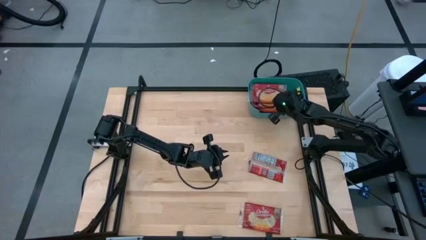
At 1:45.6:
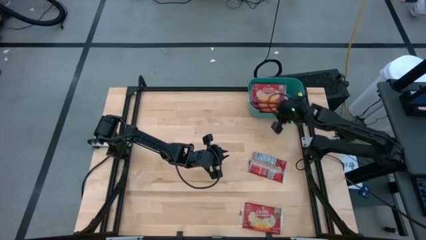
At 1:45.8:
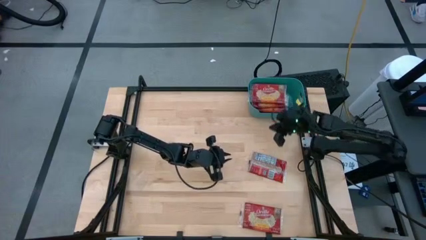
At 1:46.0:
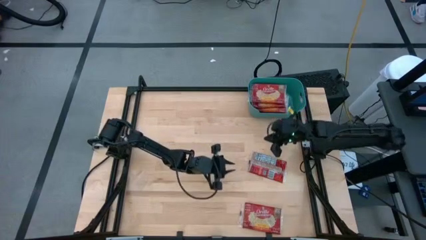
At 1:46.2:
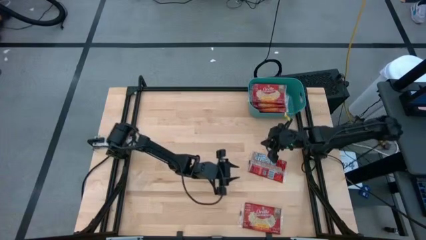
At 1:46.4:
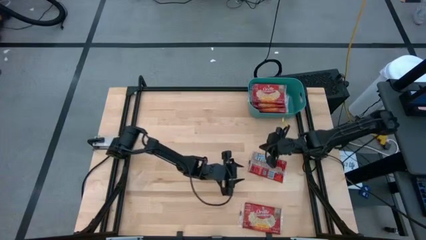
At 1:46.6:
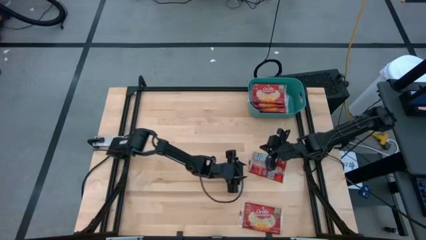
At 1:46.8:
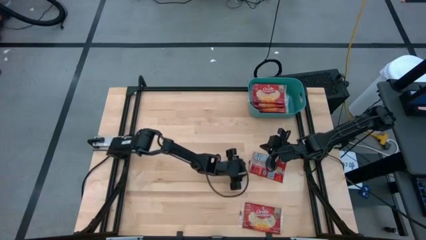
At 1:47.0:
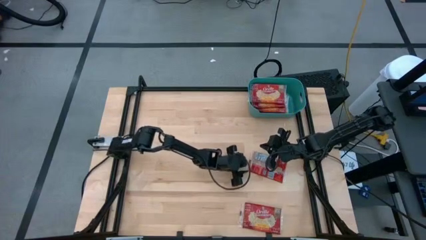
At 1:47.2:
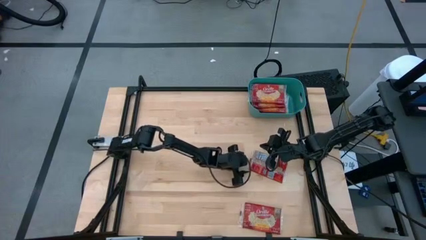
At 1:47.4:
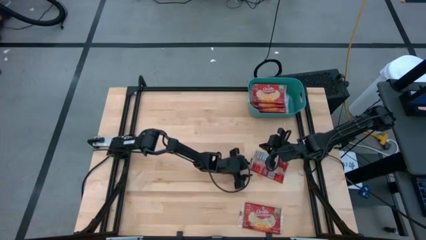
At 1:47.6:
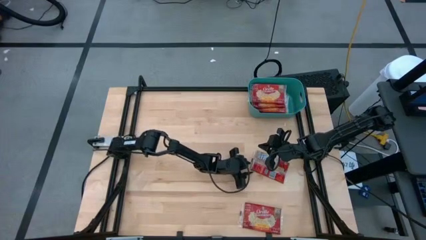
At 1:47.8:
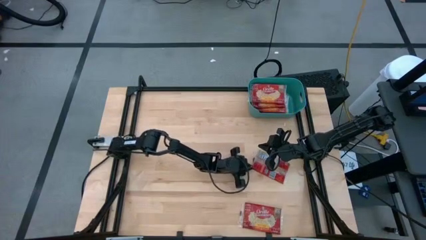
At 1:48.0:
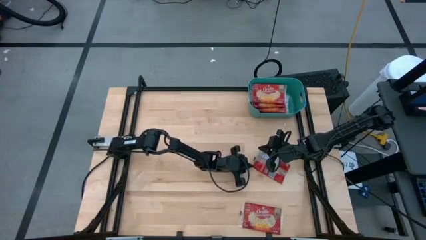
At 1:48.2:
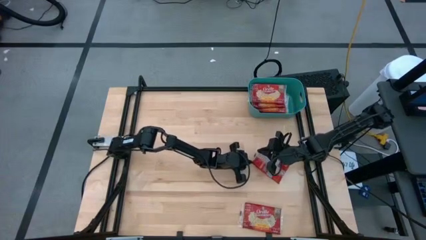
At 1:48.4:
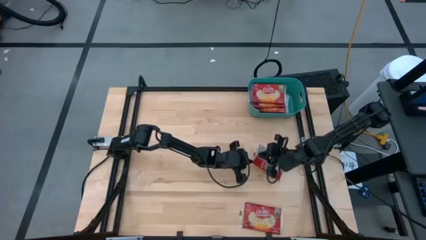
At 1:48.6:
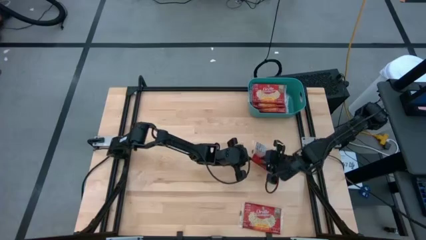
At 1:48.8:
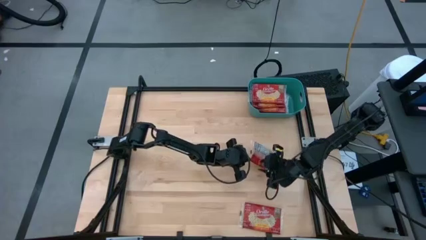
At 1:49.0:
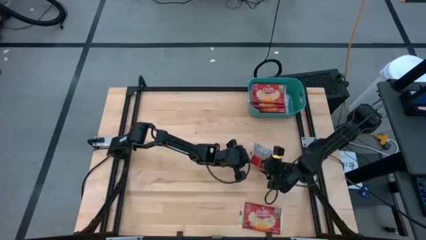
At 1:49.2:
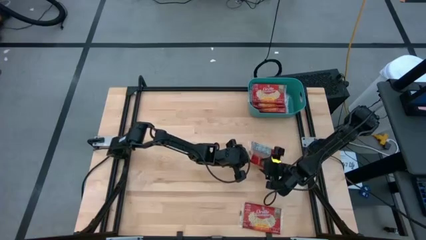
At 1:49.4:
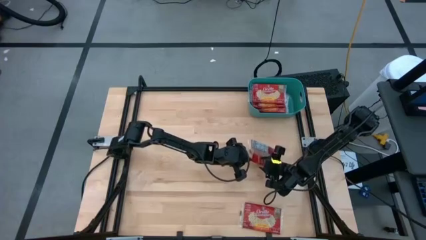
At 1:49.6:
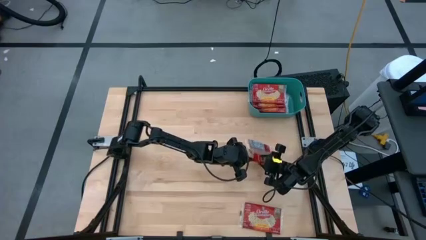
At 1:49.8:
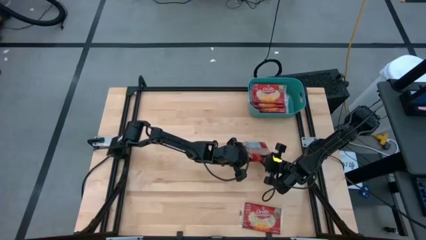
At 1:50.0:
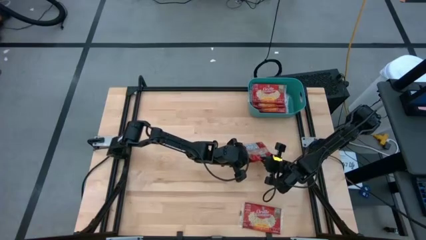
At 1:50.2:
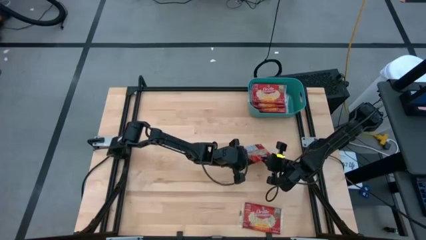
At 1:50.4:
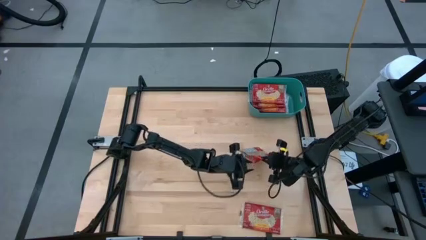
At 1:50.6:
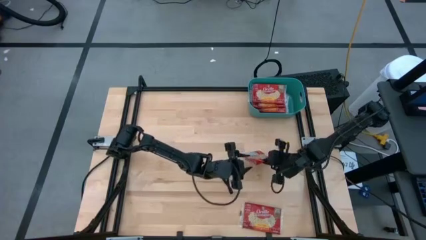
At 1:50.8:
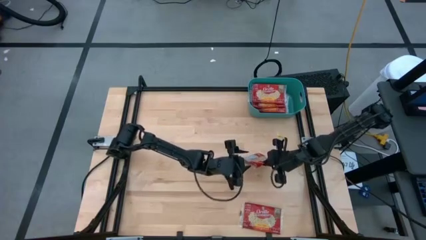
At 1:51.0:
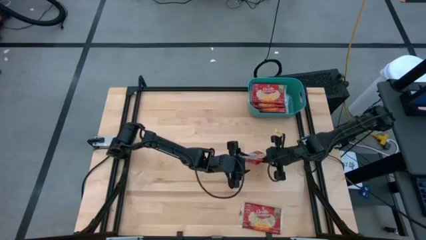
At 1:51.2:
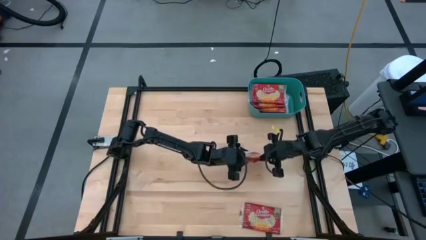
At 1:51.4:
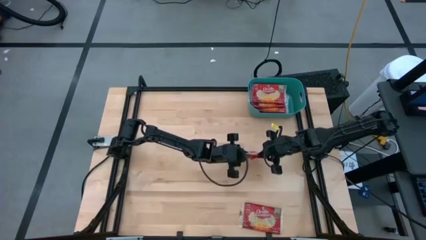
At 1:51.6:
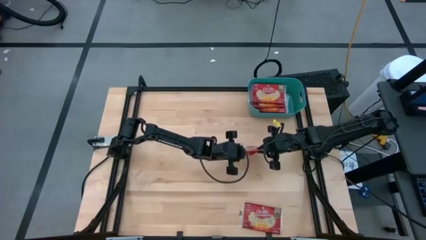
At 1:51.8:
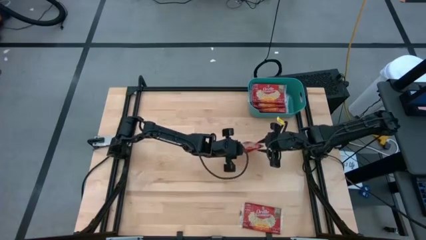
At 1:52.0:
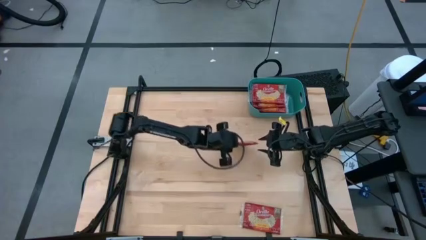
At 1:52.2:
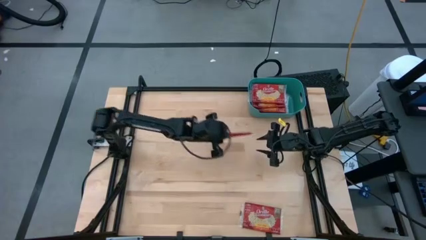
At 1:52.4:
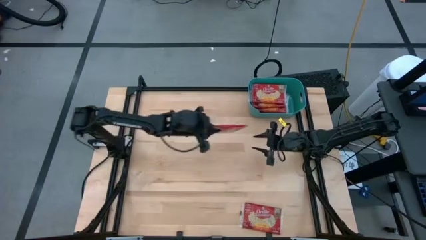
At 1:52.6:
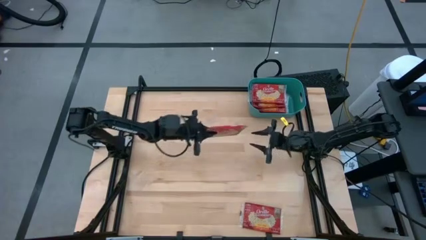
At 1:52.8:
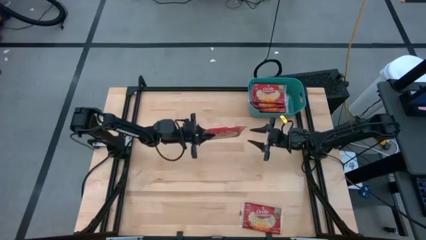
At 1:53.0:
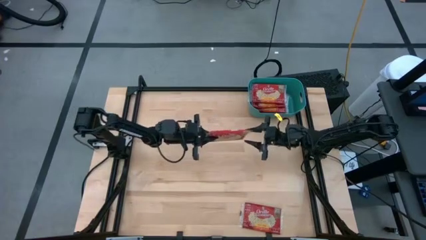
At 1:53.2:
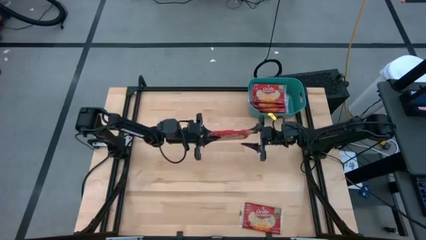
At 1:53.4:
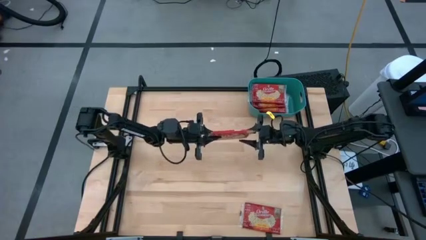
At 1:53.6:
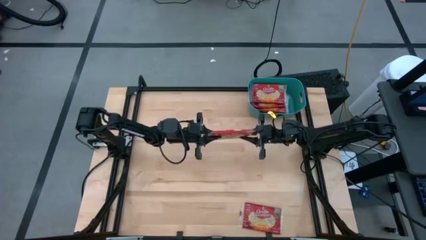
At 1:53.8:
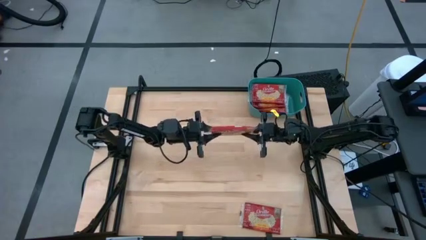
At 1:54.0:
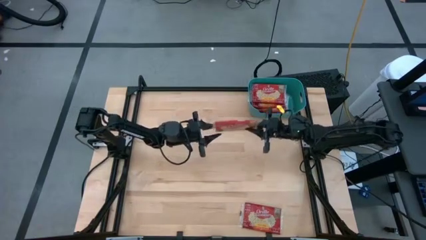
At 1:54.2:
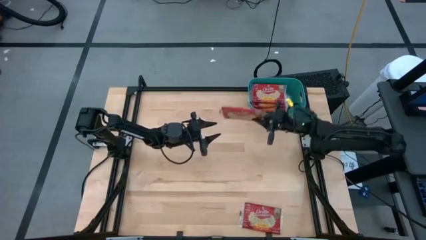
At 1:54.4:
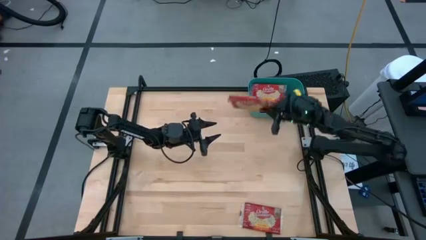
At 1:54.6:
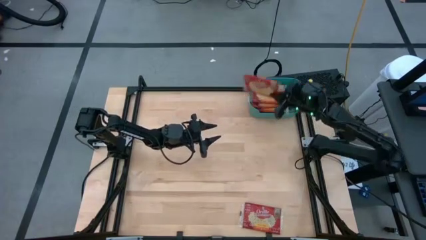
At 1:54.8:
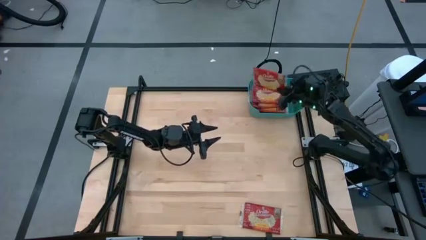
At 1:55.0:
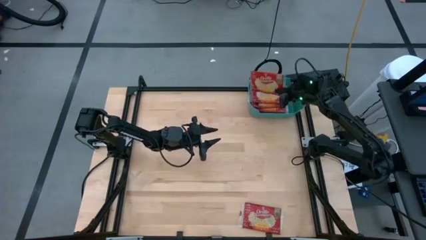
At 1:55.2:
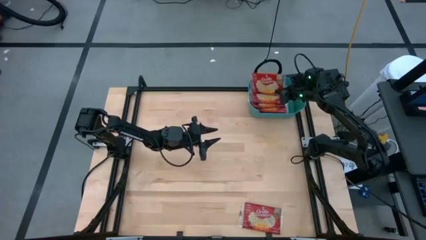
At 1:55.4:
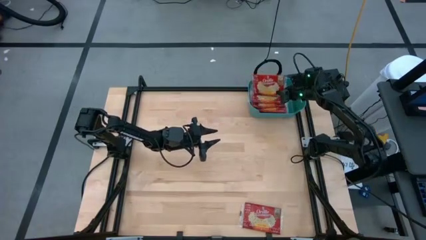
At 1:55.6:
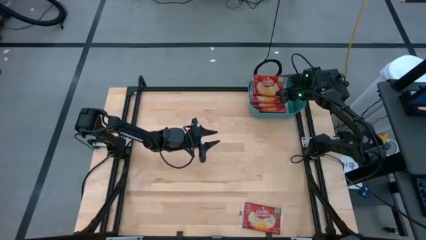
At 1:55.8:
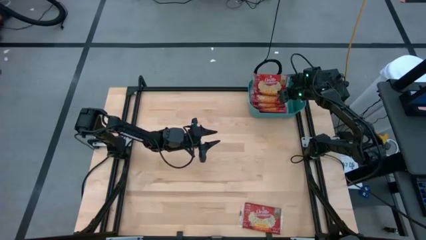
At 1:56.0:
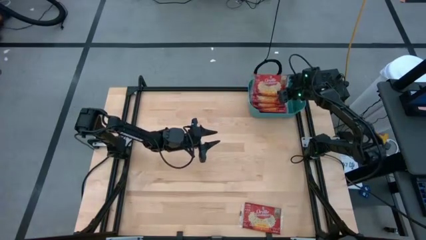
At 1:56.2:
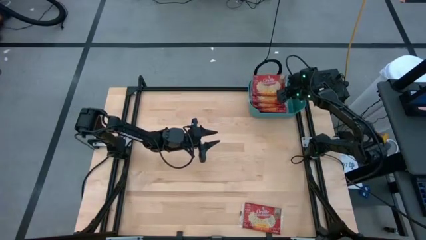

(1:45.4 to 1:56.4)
Task: Sort popcorn bags into baskets
Put the red popcorn bag into the blue bin

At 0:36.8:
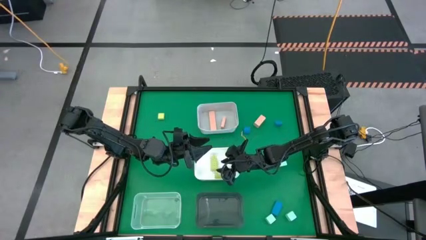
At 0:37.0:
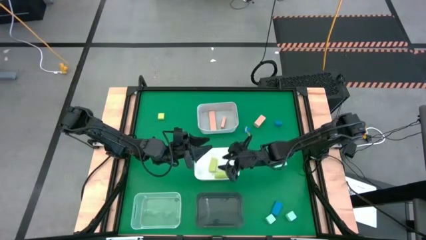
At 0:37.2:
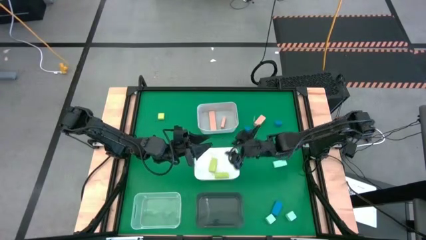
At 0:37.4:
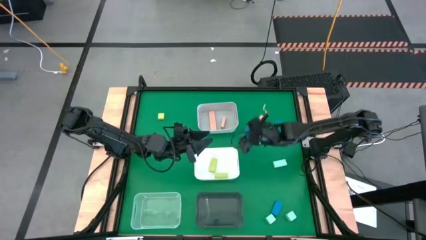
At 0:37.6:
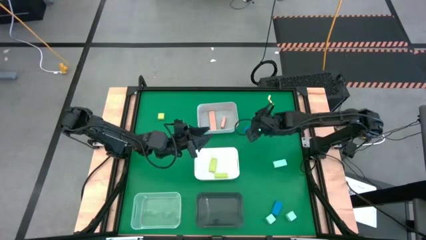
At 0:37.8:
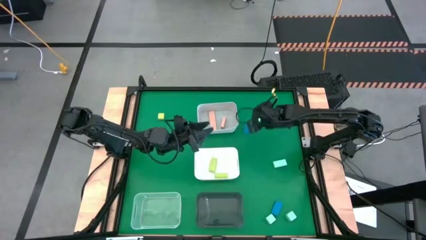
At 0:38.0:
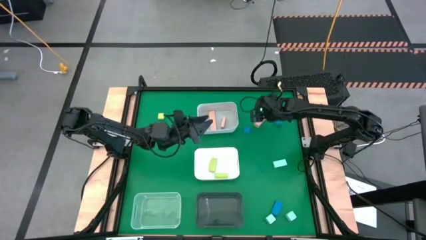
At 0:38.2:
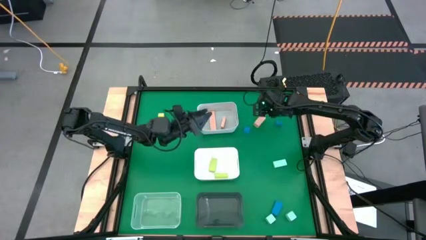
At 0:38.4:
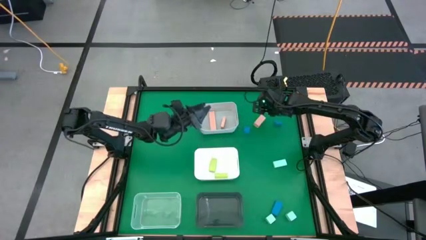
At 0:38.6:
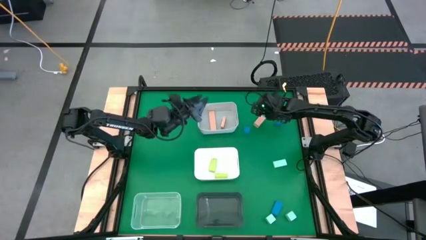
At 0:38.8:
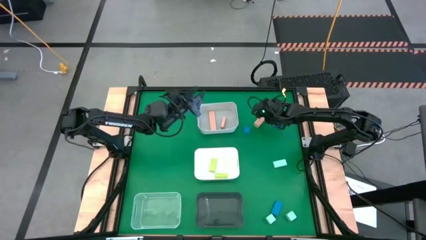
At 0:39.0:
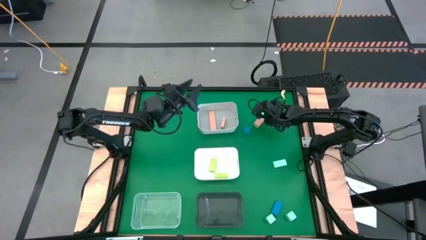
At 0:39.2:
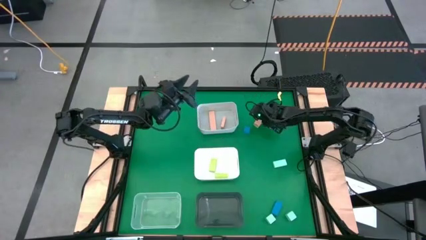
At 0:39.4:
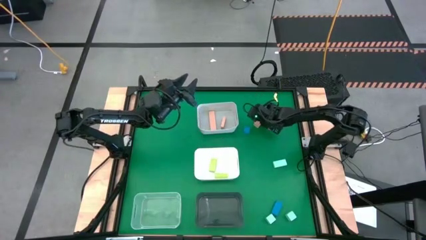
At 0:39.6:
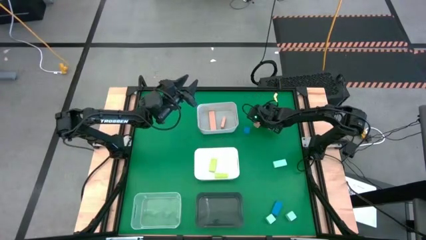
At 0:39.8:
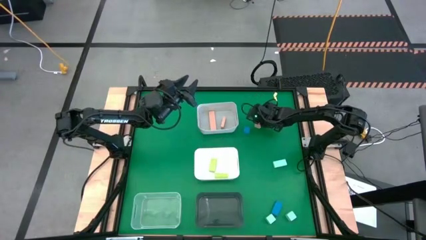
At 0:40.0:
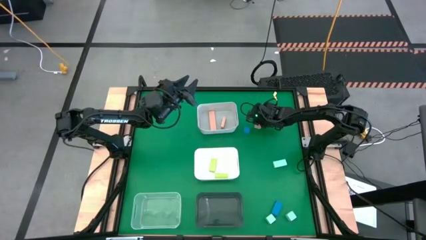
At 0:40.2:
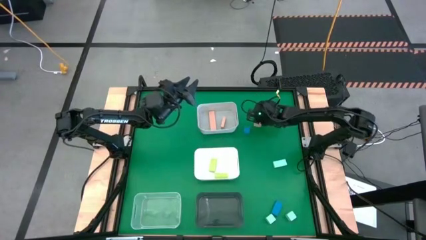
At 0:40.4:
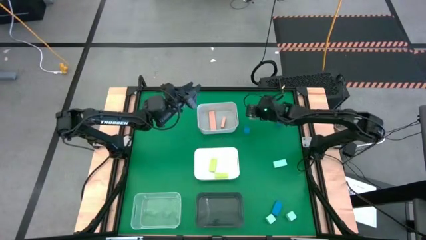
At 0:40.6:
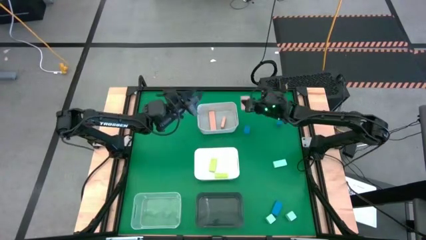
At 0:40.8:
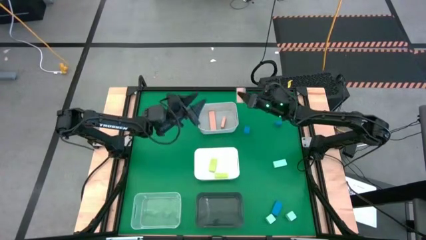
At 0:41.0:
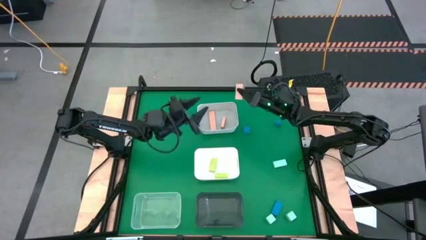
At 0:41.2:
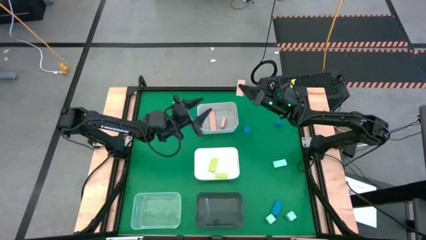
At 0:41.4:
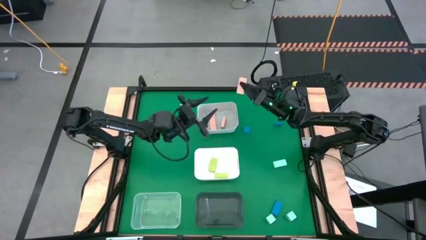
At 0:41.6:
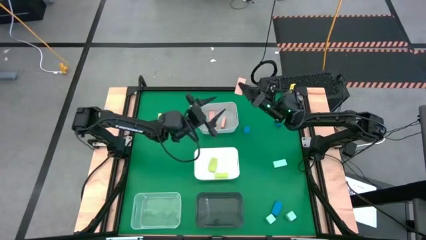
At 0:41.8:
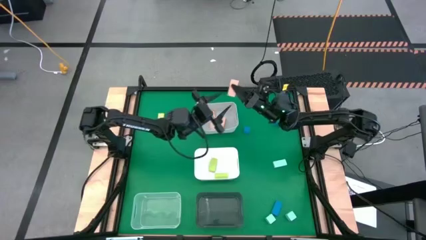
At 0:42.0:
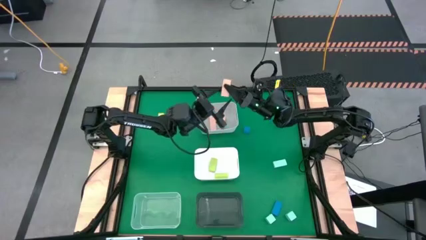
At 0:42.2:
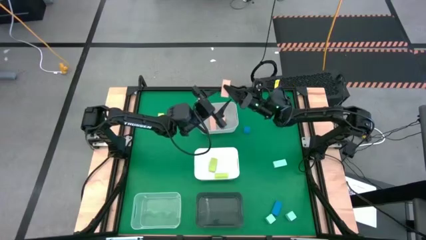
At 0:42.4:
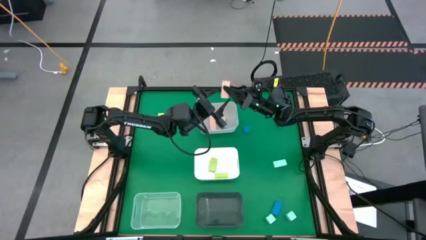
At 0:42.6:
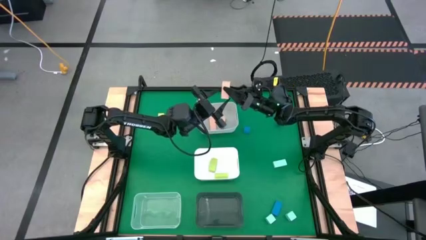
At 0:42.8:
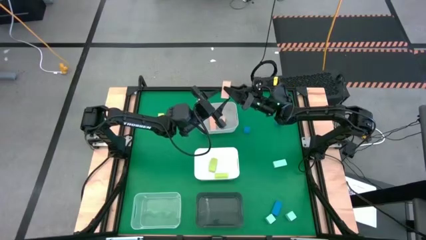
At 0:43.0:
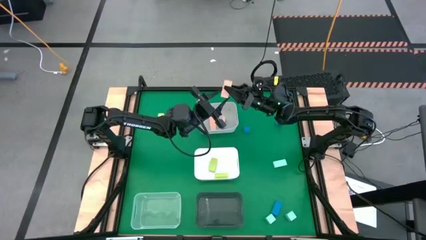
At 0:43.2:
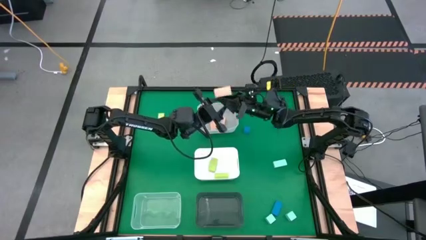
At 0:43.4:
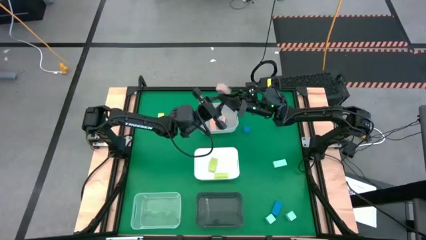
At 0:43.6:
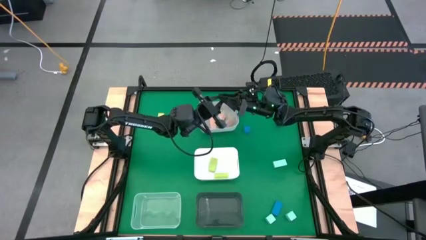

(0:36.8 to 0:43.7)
Task: Sort & place blocks by color
Put the brown block into the gray bin
